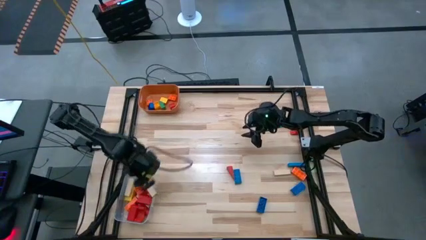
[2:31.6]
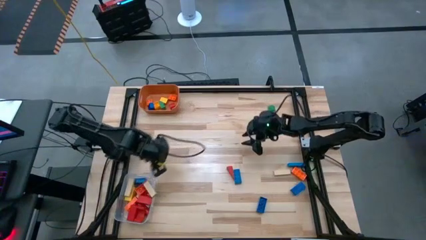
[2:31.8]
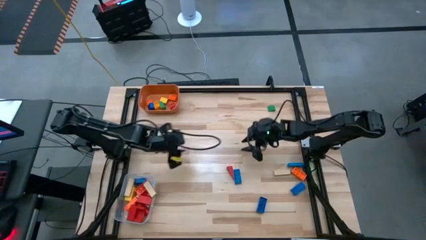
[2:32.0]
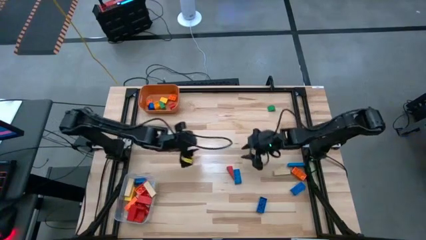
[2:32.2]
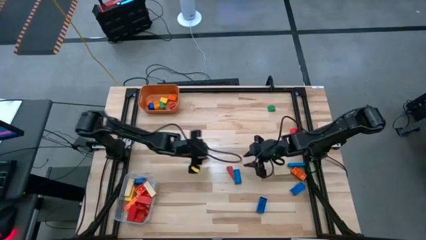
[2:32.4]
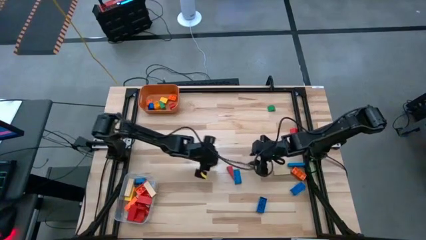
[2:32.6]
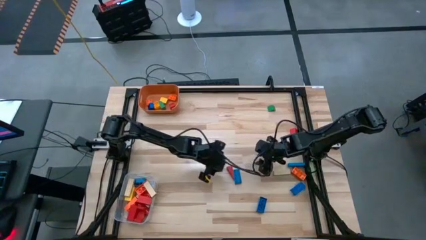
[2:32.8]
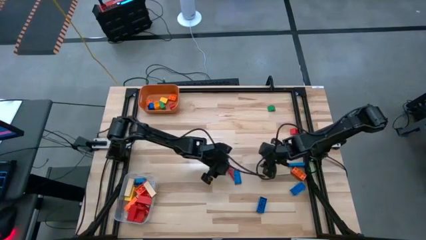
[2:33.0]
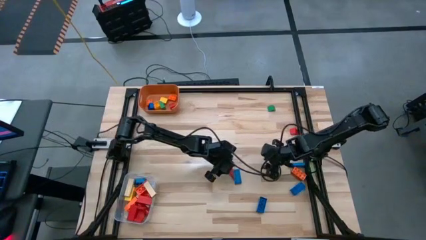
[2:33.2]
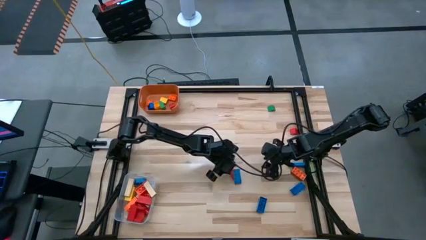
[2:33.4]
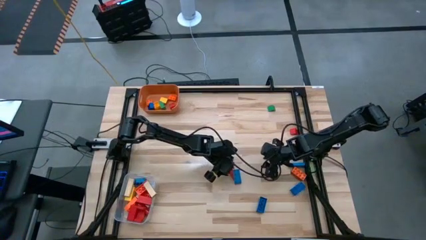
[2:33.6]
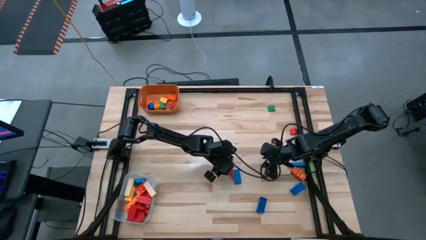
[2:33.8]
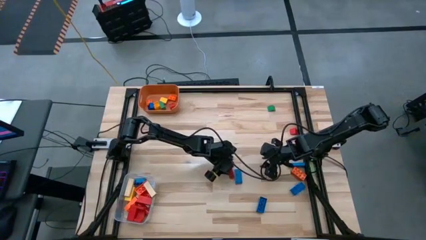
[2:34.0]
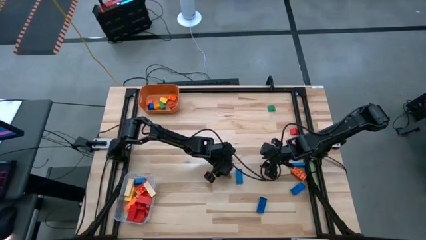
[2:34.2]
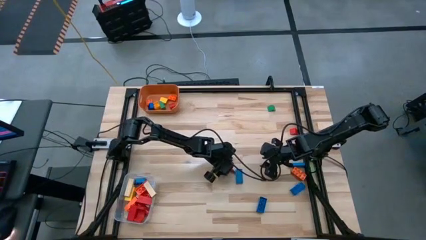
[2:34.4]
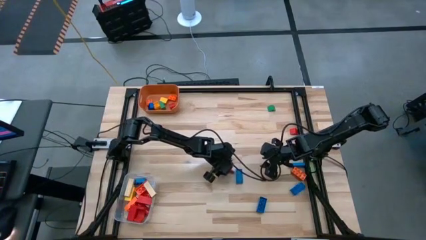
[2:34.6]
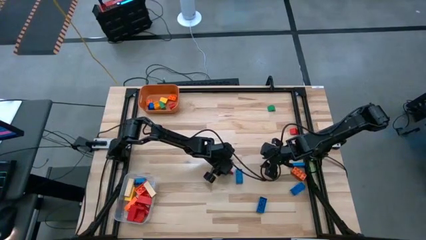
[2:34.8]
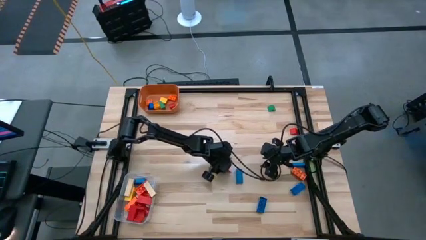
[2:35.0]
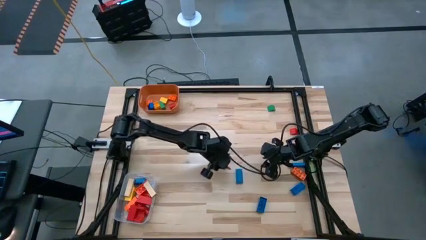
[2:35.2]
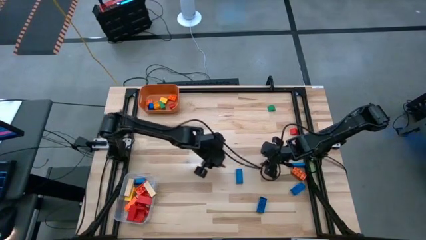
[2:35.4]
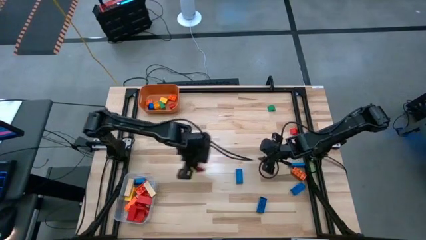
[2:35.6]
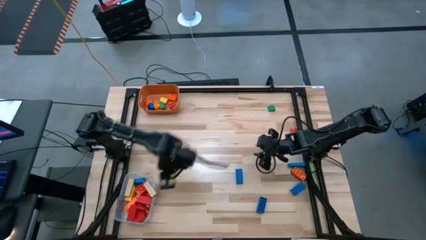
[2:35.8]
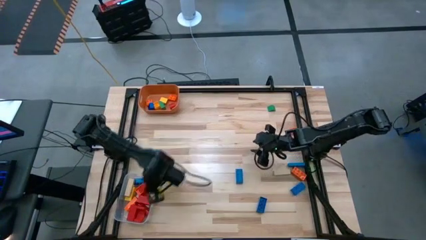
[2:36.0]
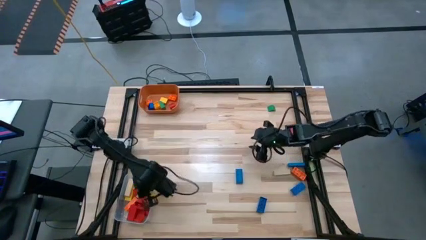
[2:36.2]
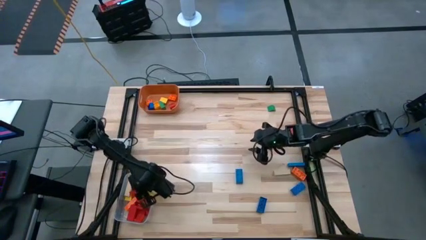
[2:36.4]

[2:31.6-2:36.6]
Task: Sort blocks by size
Put the large red block into the transparent bin

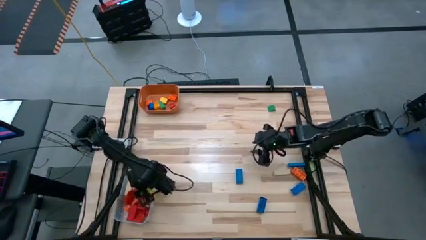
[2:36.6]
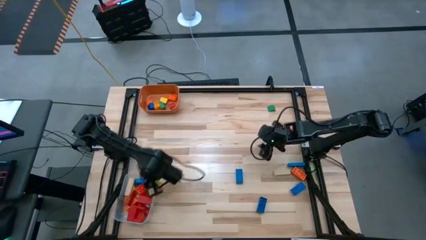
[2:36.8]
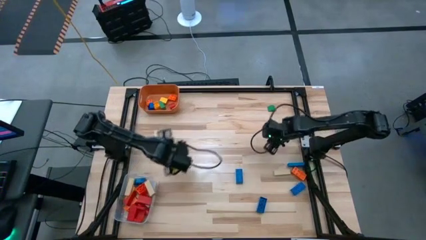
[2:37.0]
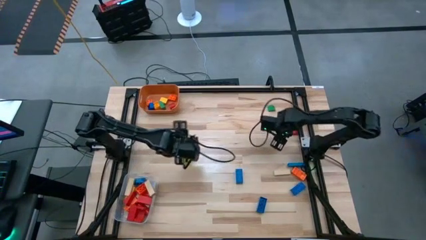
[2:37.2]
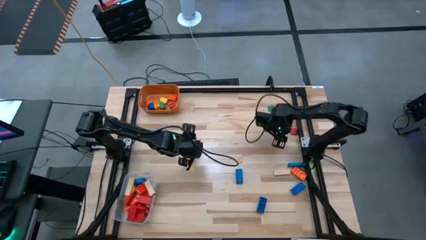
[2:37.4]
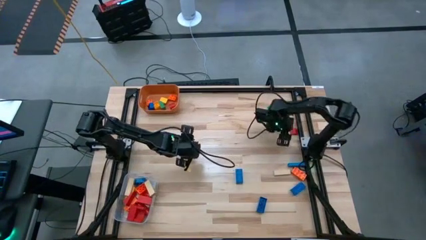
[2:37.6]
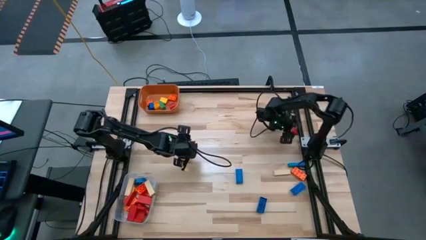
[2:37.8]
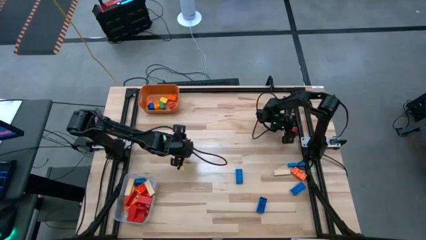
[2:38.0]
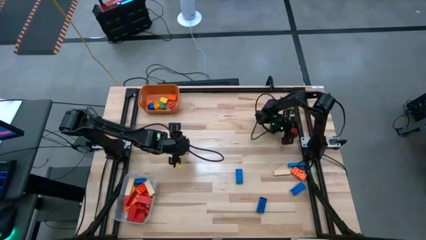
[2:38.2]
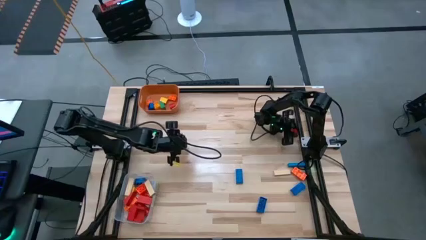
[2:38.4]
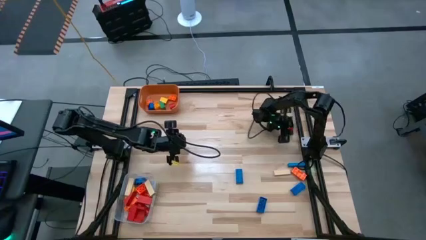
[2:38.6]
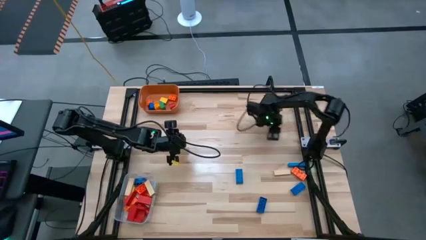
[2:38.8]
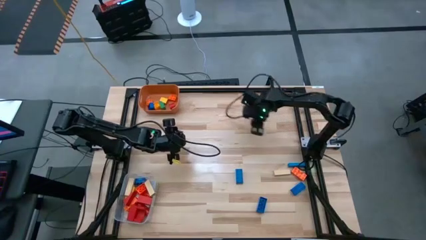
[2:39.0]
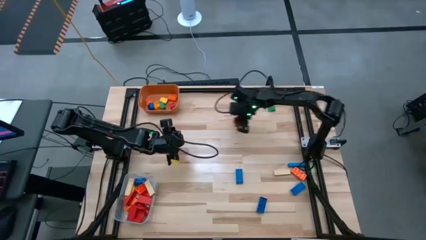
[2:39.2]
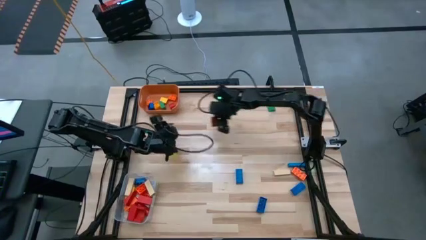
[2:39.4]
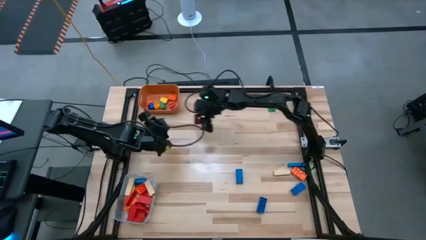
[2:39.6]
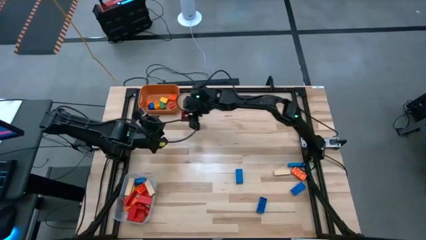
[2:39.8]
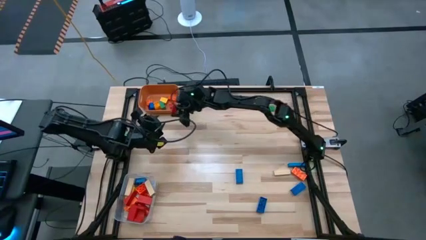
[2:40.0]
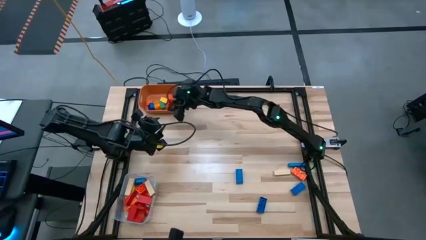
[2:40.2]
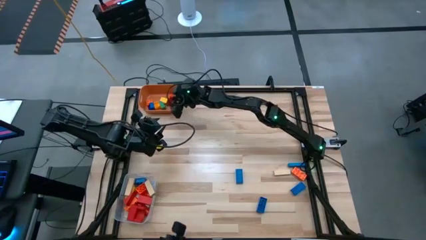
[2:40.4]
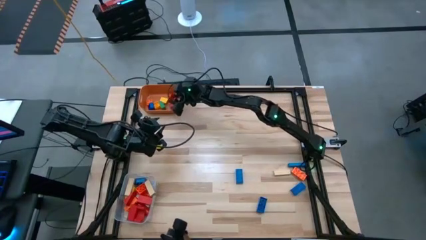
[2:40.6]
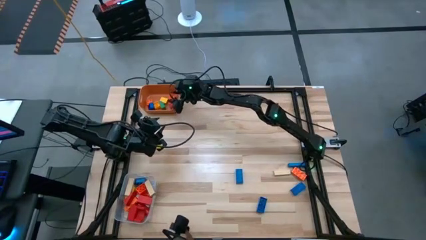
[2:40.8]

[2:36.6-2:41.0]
Put the small red block into the orange bin

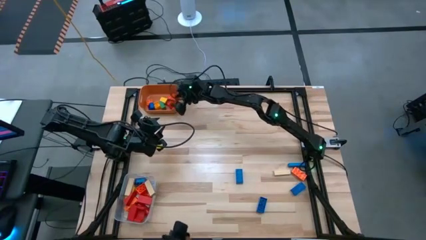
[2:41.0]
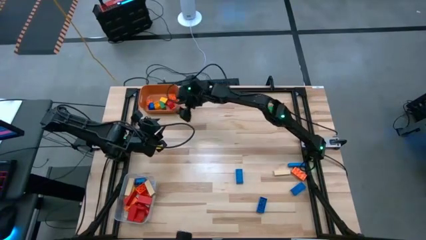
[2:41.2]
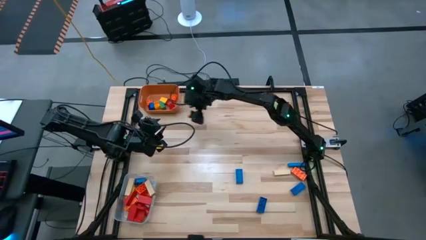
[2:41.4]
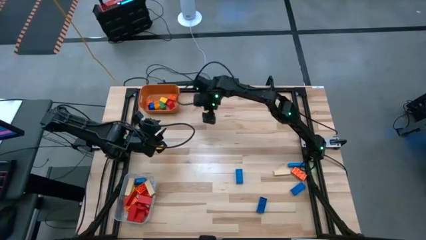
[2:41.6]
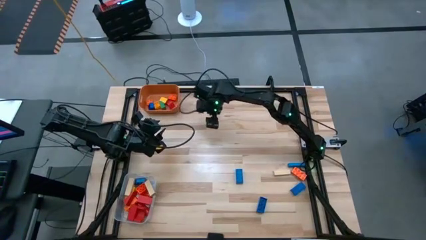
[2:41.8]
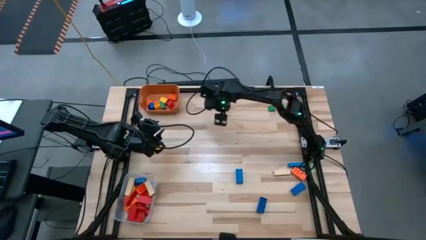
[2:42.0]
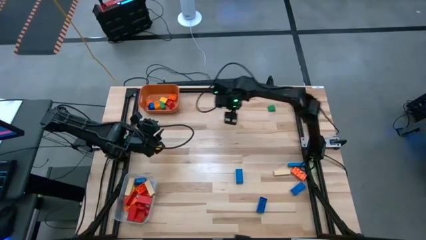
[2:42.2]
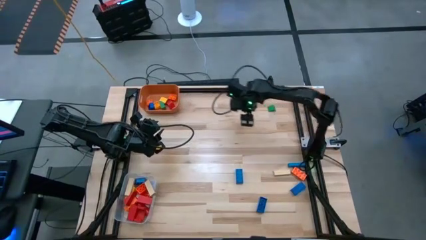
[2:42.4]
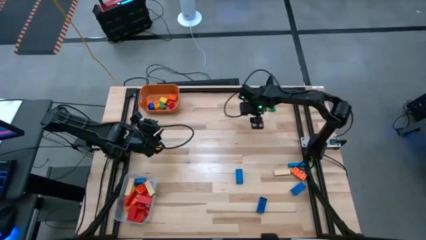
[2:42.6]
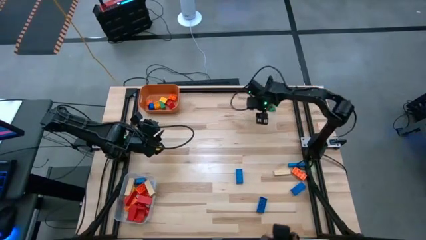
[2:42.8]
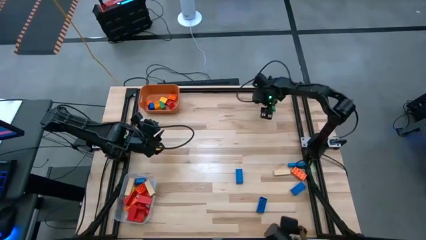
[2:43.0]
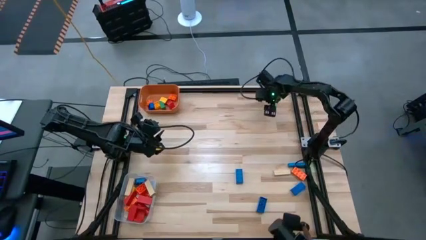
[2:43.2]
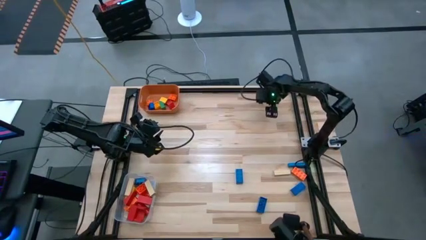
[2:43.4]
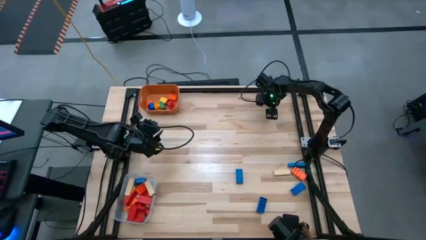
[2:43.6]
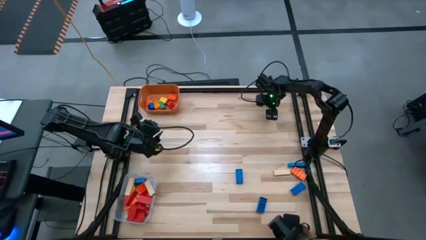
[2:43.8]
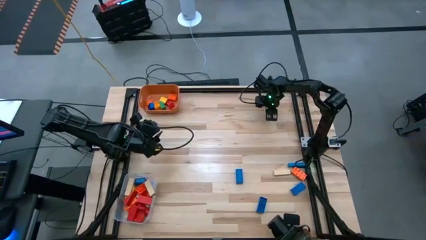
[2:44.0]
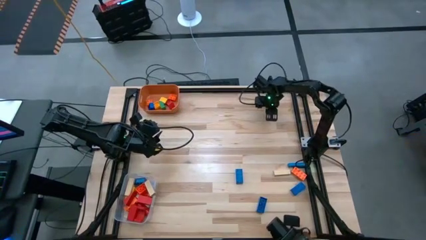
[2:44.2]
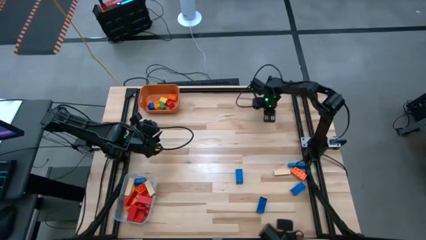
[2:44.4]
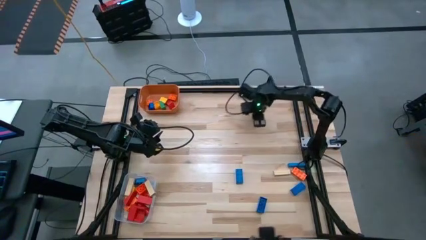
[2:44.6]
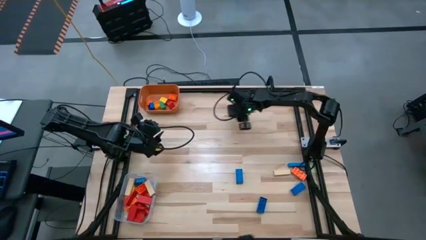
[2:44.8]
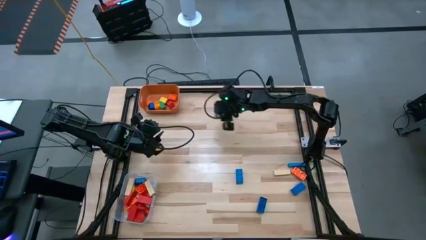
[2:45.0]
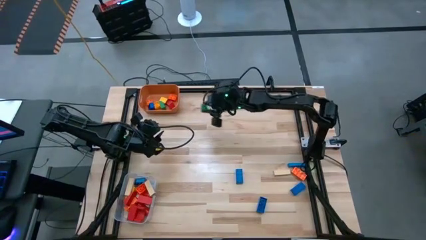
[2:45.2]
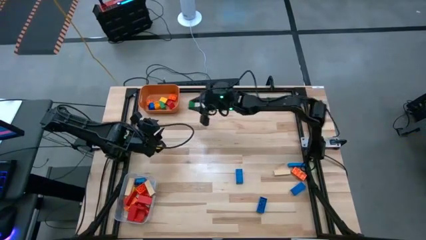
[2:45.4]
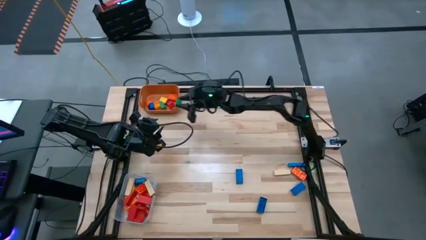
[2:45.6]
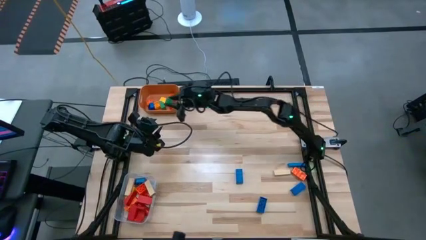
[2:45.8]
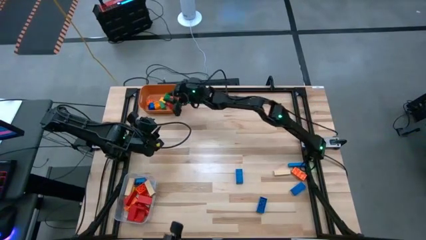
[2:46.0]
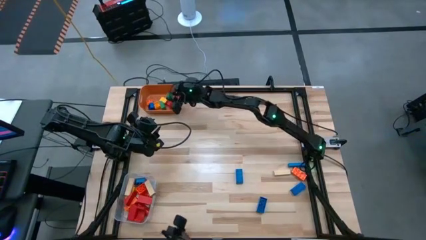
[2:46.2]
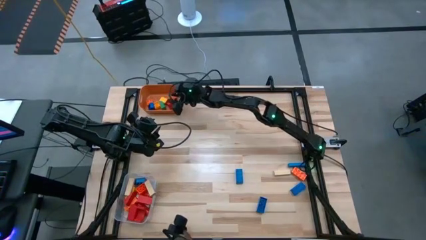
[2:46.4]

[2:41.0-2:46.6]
Put the small green block into the orange bin
